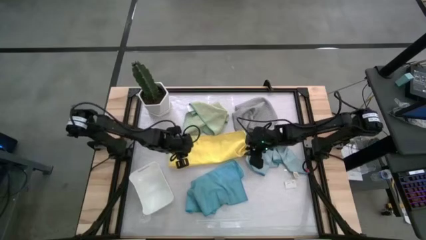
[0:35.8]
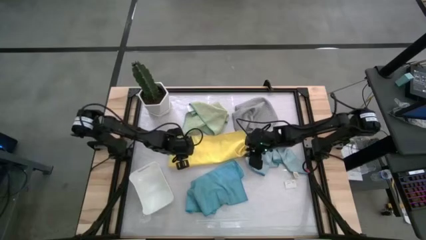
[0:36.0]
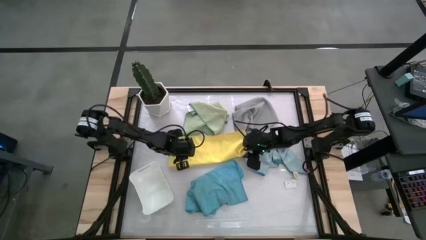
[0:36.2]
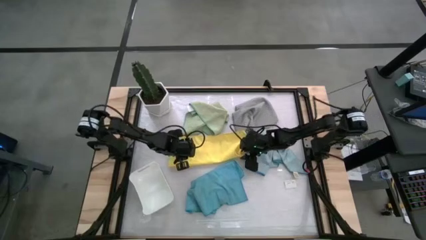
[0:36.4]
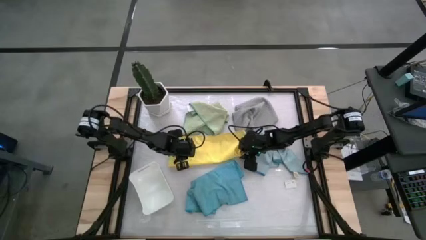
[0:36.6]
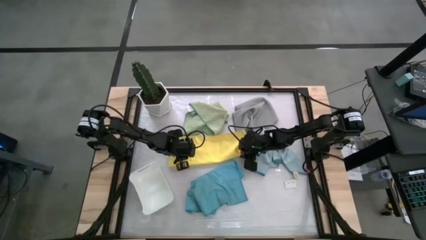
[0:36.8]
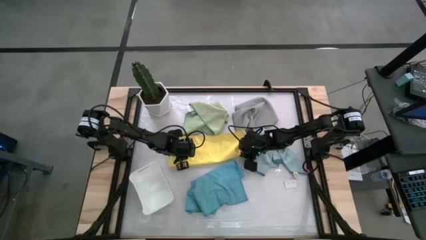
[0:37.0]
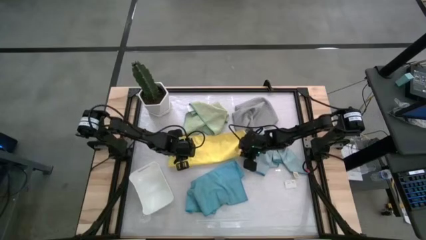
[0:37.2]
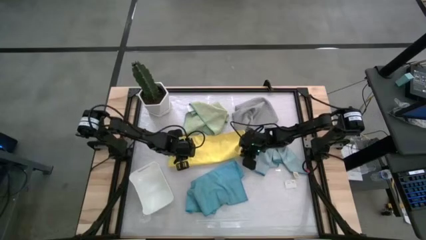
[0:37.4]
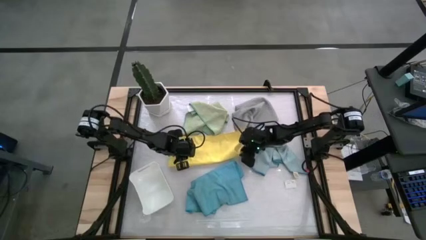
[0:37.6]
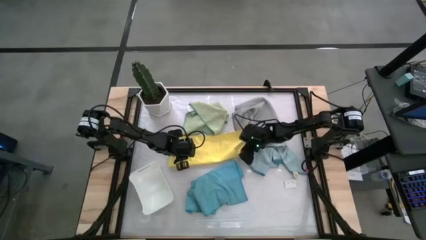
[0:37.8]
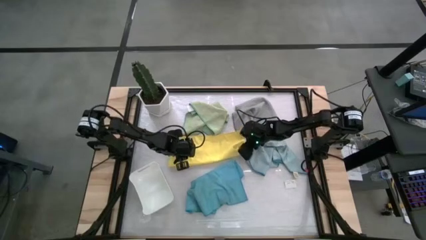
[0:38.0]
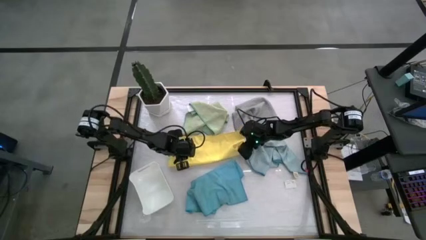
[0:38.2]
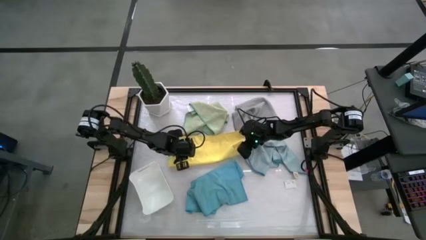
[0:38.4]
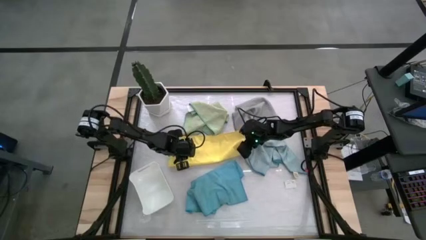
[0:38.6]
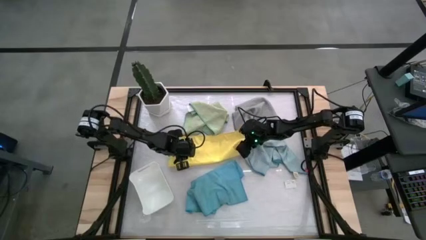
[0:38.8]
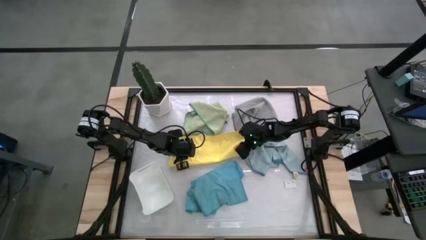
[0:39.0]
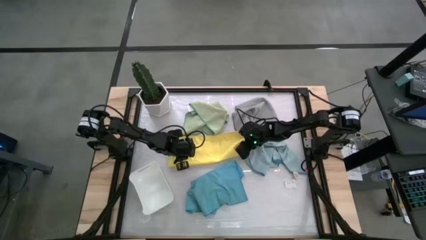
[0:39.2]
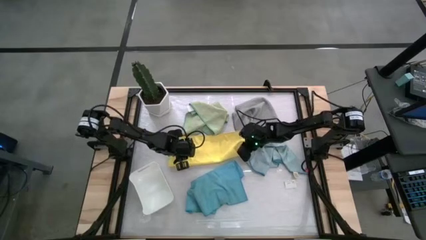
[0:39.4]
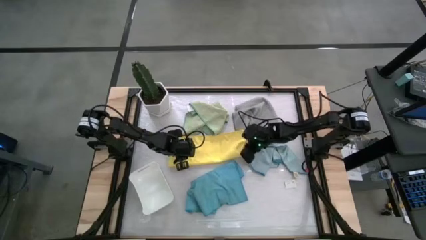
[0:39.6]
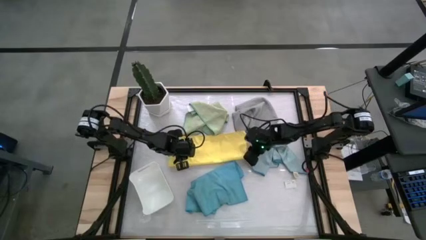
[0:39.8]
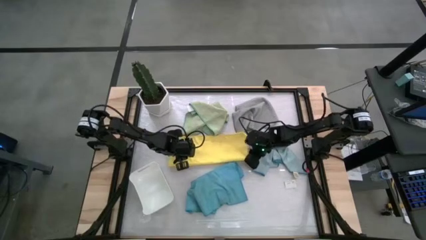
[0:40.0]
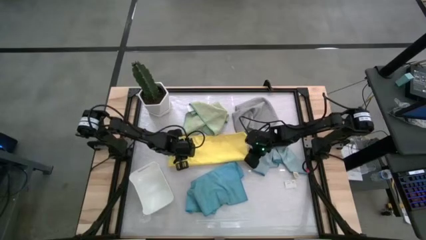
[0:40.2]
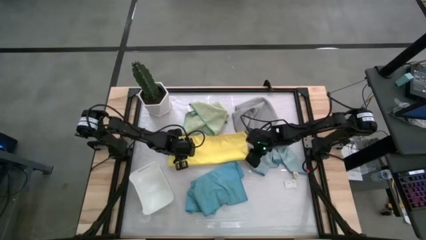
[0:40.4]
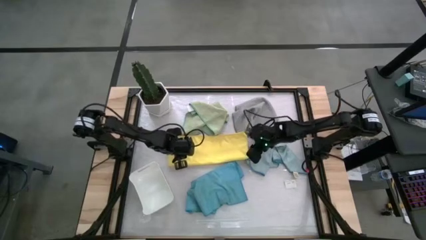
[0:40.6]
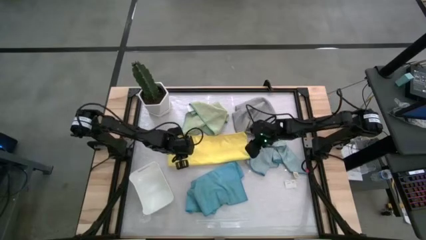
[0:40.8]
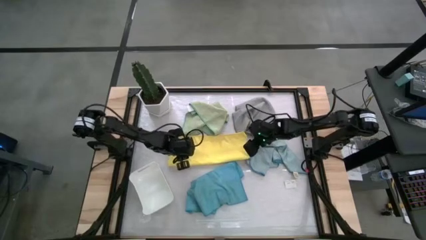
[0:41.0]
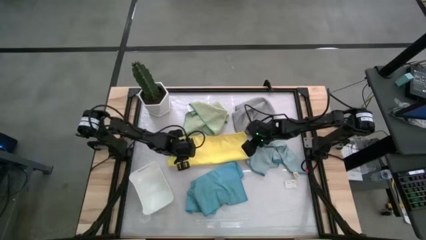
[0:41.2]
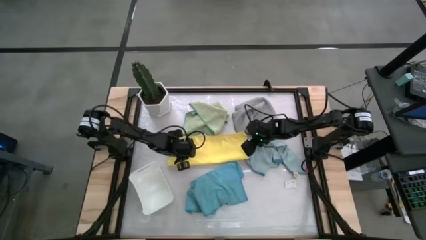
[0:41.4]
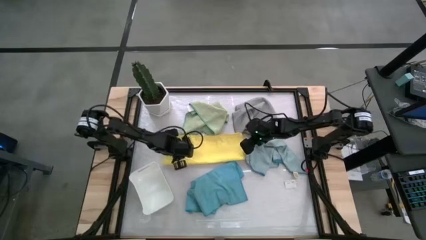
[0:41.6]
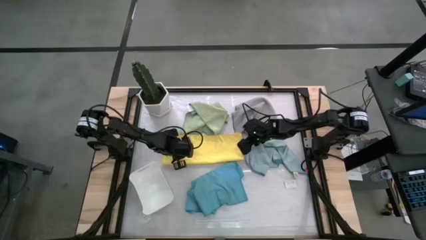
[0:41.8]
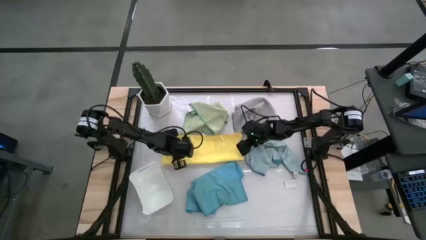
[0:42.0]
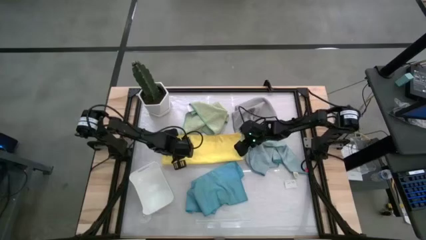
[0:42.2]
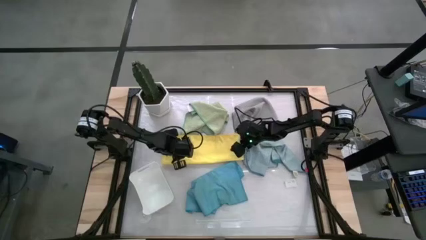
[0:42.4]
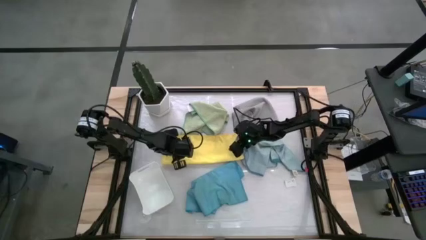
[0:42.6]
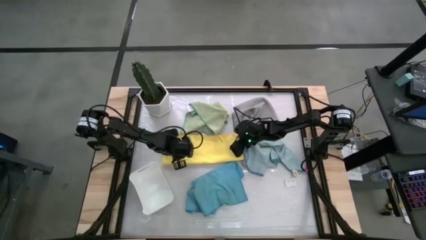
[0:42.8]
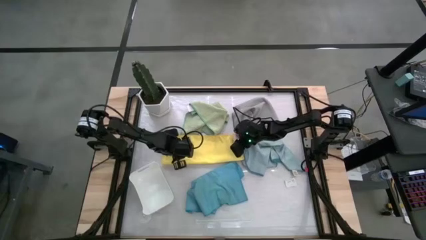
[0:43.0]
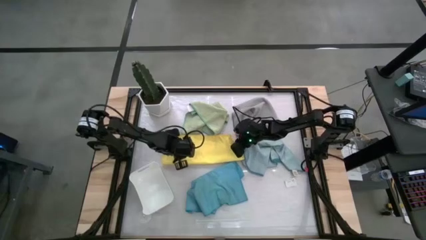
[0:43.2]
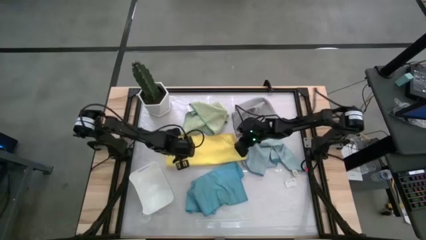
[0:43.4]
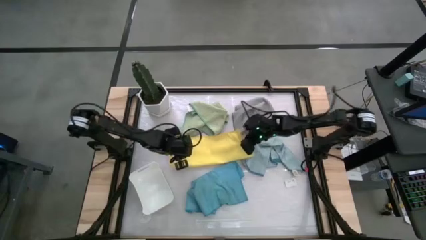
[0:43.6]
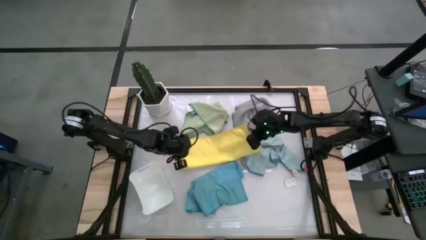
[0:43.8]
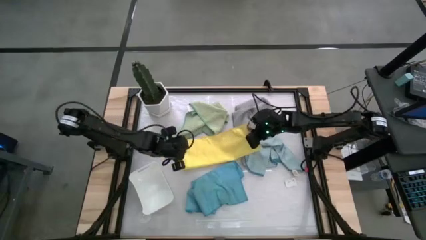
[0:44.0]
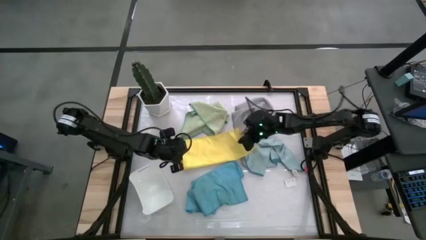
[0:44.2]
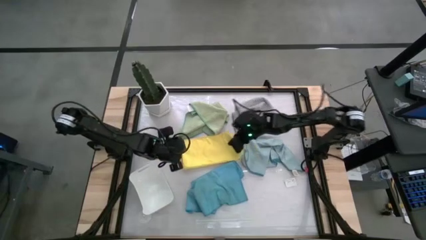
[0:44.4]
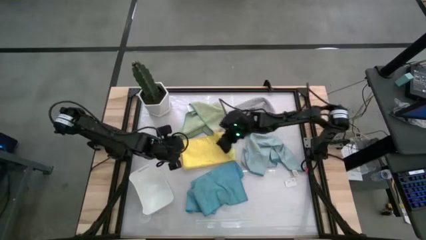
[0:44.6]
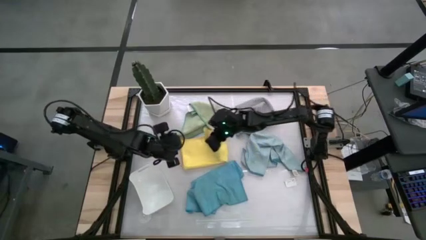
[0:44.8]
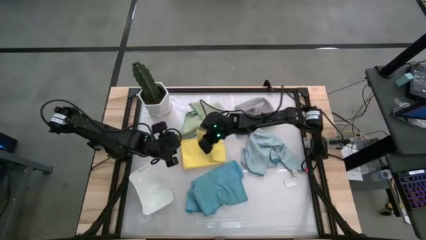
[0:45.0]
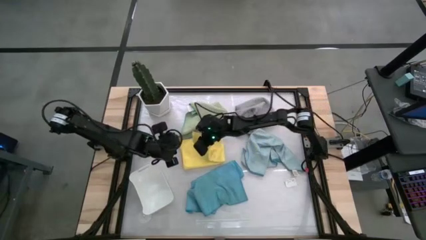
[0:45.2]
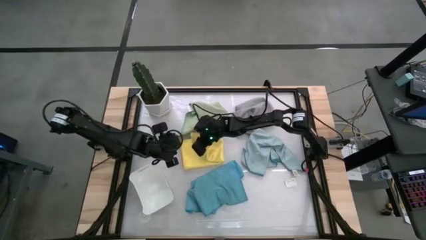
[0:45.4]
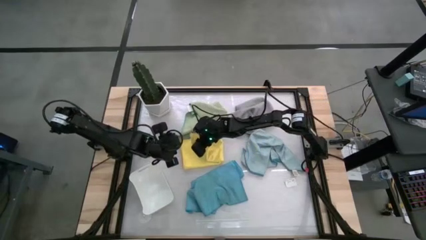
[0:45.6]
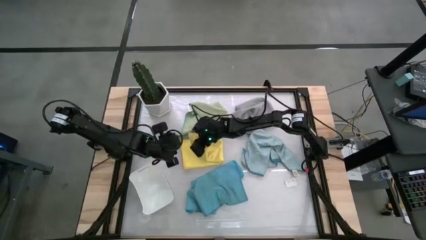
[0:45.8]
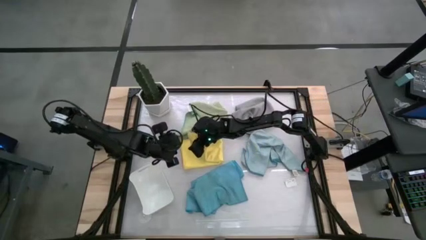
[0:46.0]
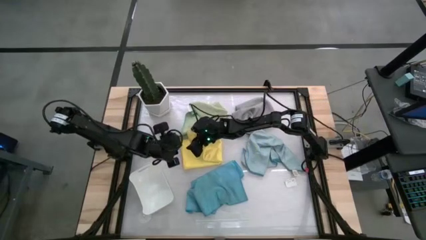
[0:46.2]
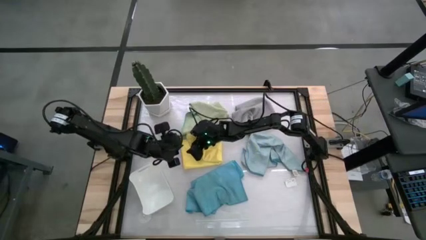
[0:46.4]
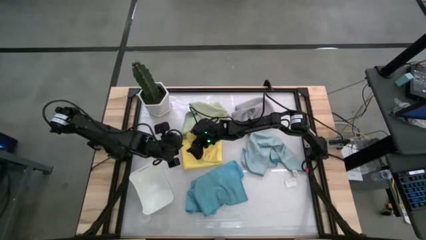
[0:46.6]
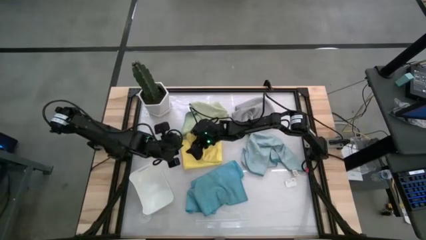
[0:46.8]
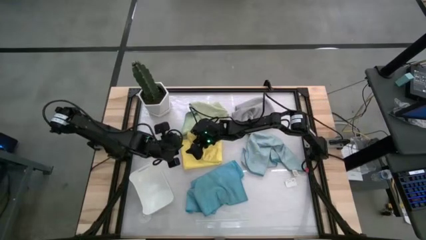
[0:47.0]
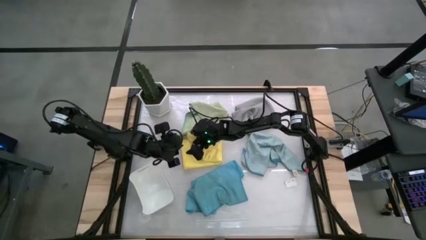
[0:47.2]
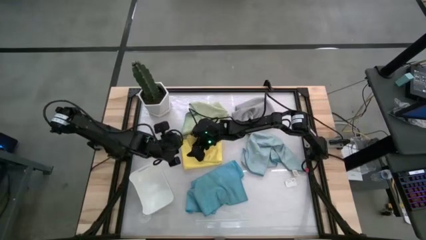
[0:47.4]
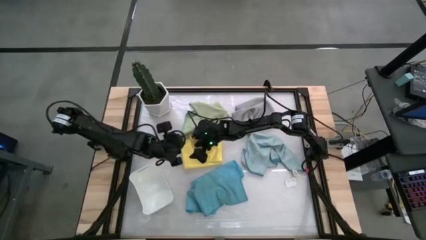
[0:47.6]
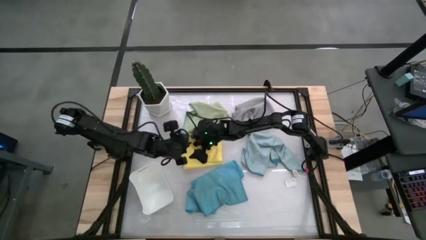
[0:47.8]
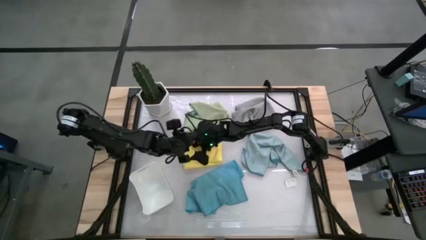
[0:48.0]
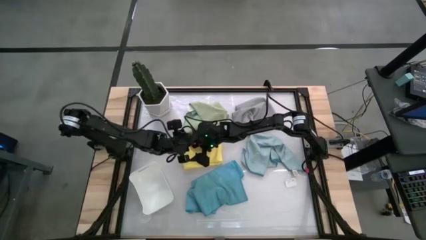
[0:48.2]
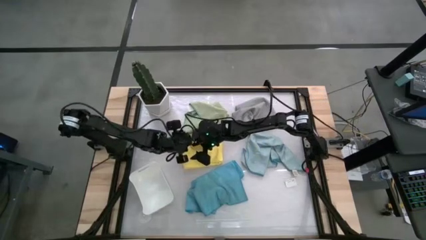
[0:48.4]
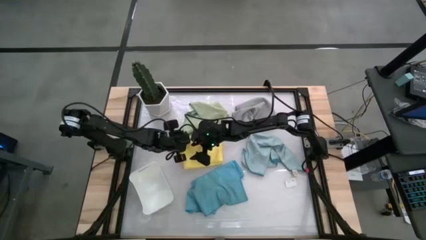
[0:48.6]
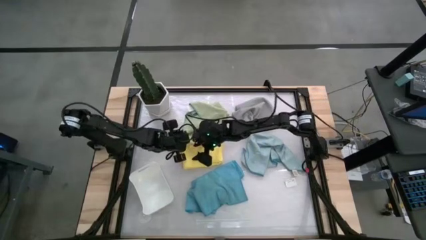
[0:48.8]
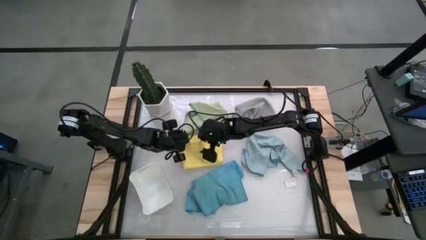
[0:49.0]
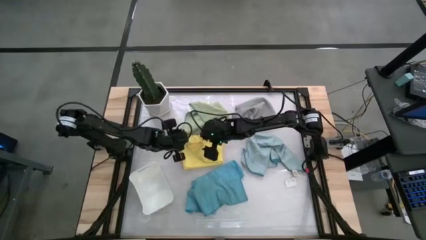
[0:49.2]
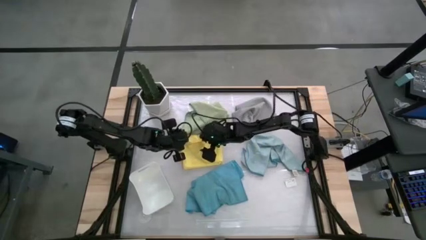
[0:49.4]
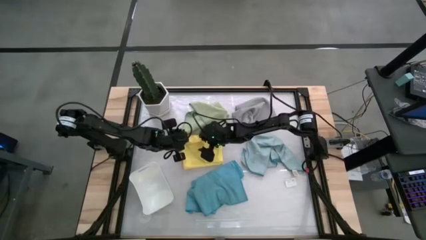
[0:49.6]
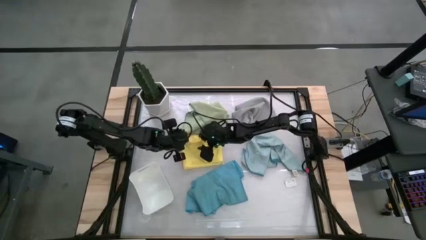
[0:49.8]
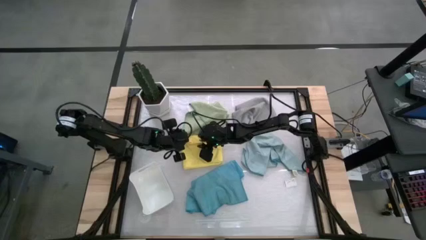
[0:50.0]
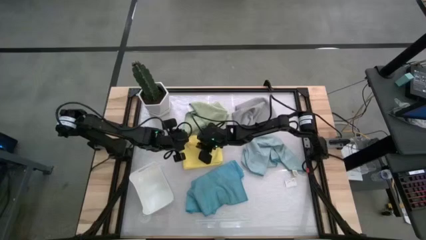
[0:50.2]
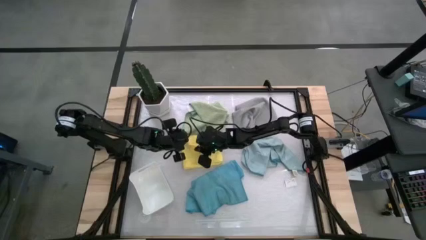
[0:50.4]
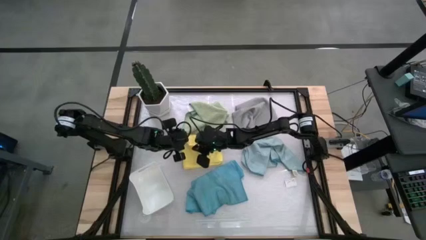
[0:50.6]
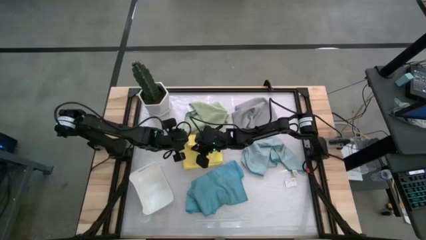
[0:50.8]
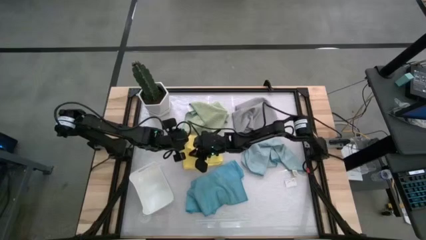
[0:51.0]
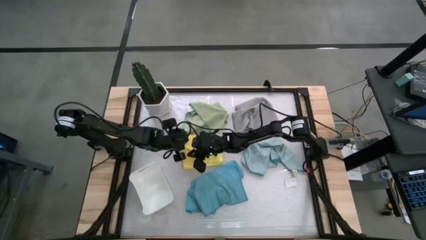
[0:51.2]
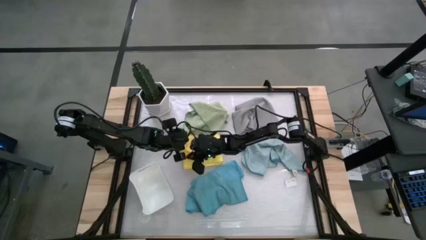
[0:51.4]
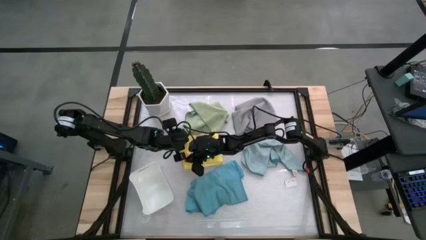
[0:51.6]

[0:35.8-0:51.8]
Task: Fold microfiber towels
Fold the yellow microfiber towel
